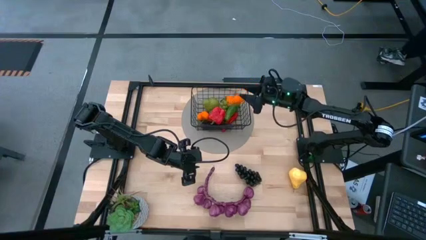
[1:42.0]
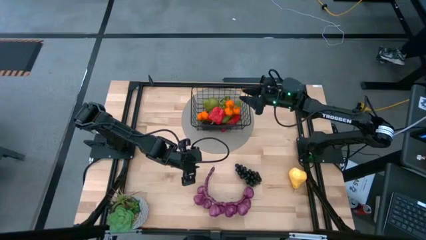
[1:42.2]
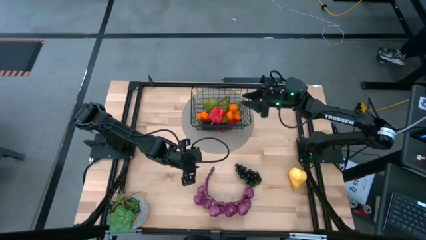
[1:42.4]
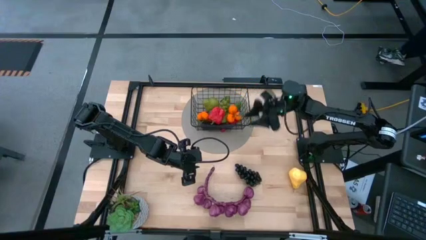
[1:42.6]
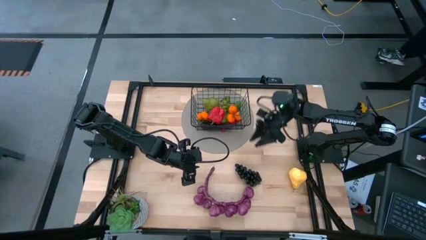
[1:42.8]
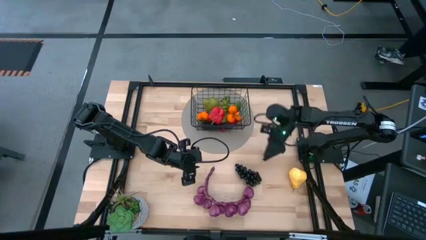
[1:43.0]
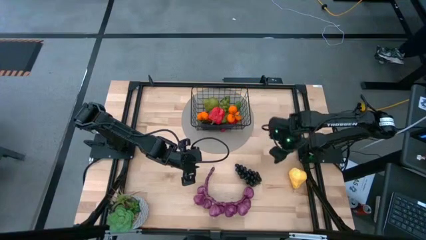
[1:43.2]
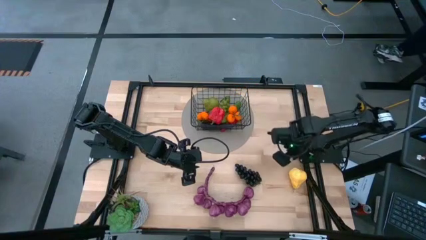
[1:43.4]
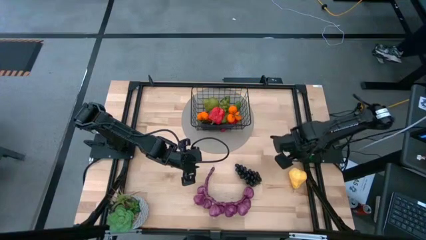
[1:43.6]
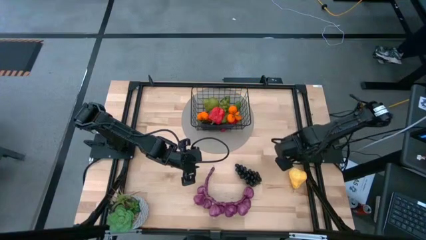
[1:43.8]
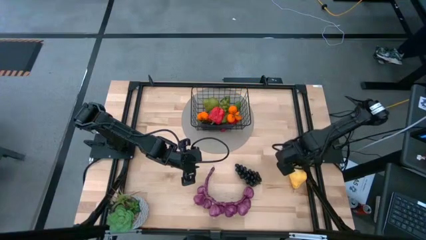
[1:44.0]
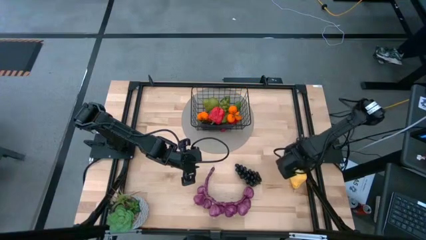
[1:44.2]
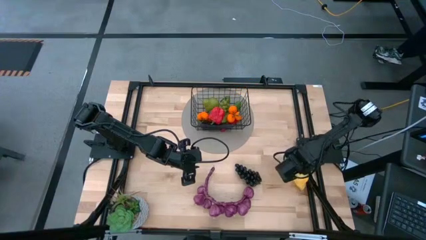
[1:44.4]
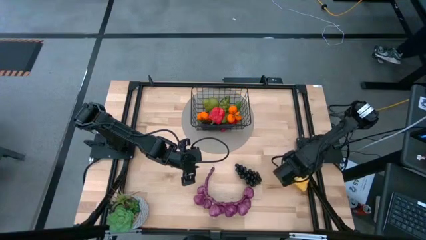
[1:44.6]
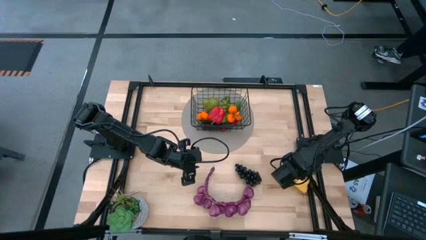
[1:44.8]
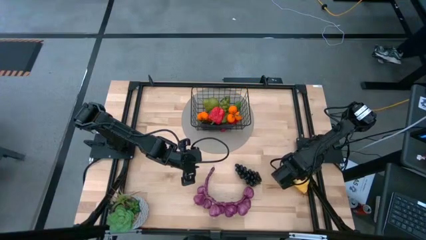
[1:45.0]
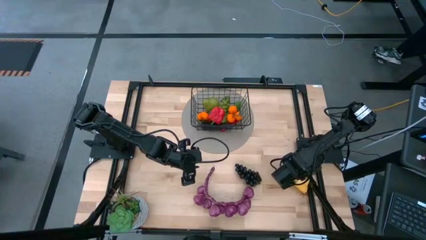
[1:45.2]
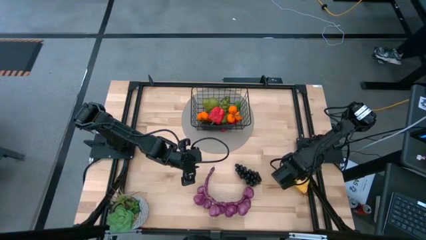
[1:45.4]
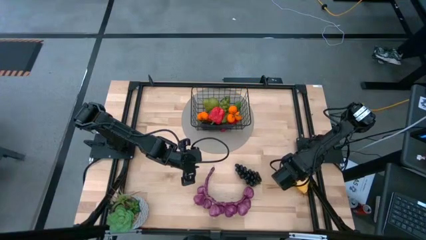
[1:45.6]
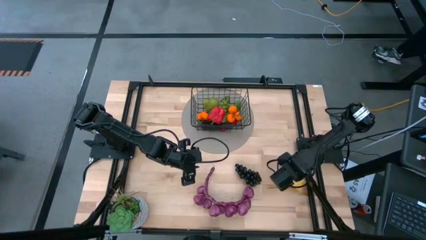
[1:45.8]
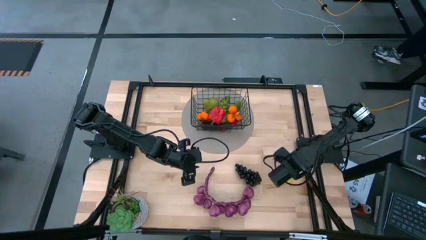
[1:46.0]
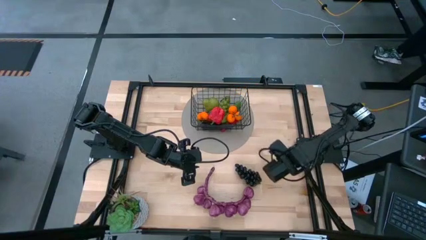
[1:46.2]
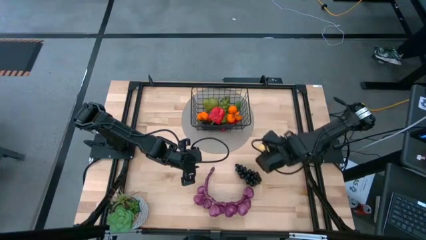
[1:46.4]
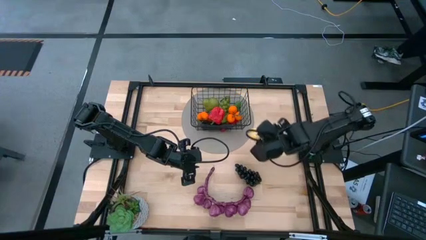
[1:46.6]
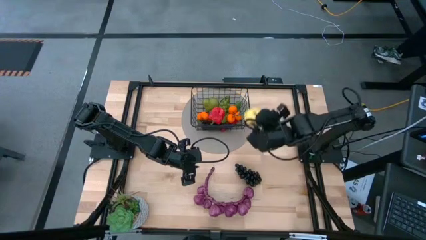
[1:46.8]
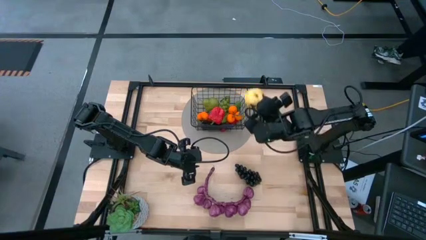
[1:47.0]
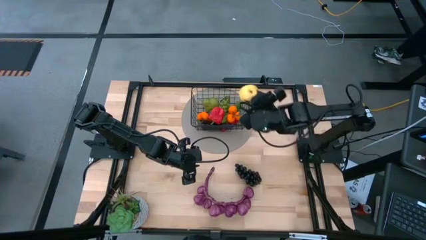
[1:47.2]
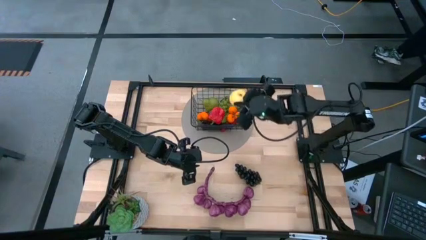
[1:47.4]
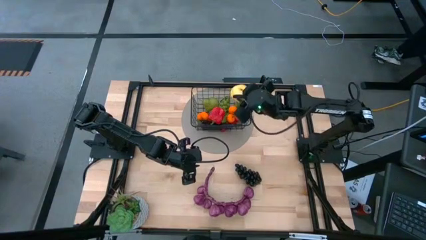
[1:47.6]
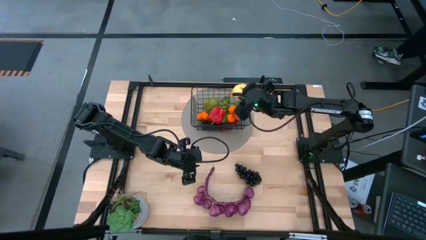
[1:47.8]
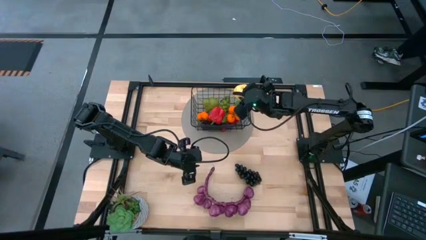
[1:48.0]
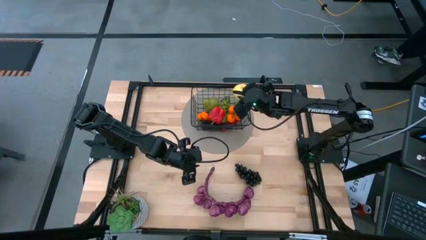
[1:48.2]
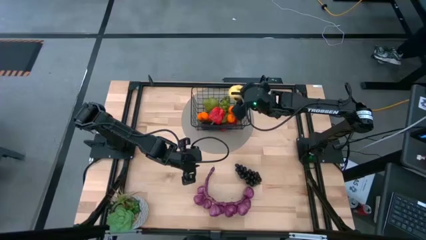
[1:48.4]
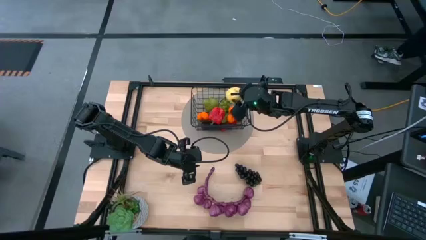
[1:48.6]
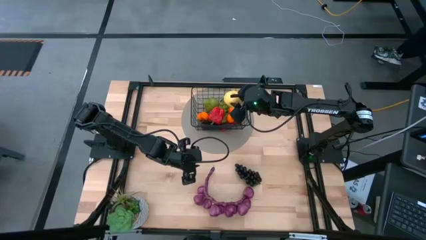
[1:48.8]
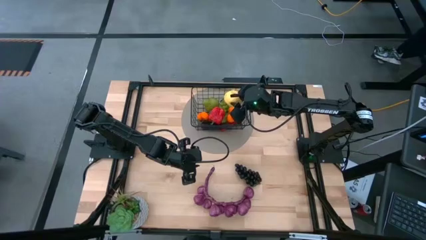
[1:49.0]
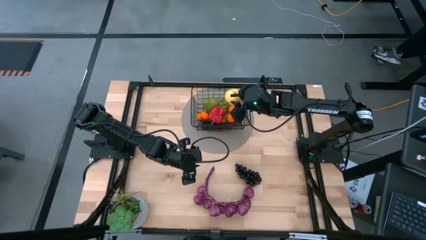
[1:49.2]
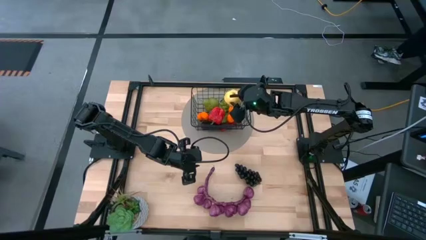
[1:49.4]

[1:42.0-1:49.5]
Task: Build produce basket
Put the yellow pear into the black wire basket

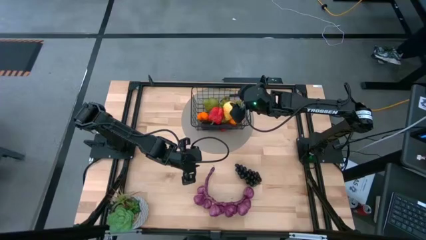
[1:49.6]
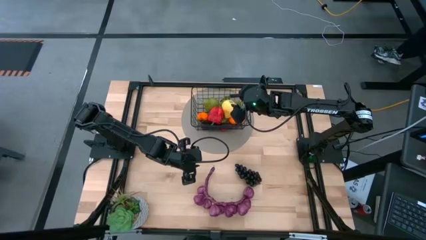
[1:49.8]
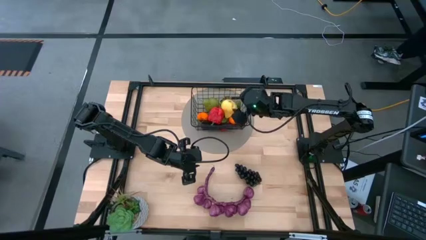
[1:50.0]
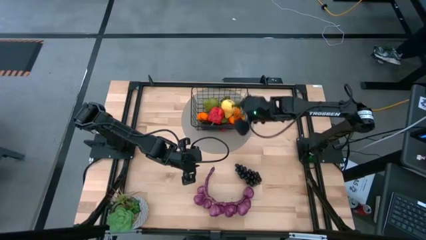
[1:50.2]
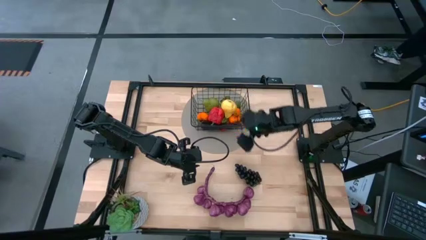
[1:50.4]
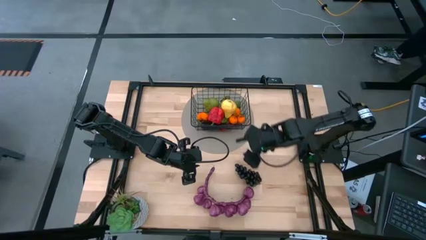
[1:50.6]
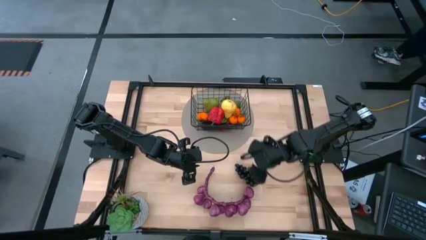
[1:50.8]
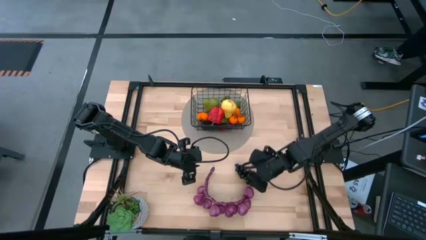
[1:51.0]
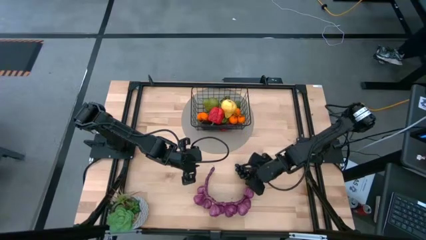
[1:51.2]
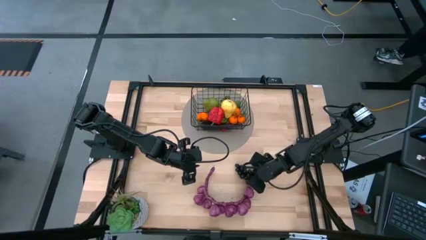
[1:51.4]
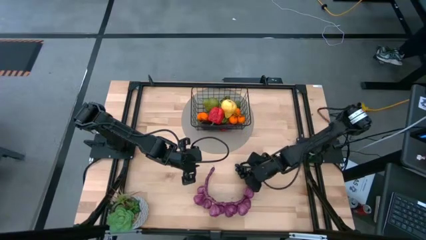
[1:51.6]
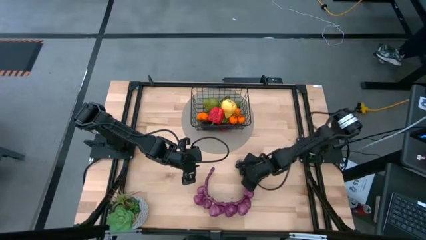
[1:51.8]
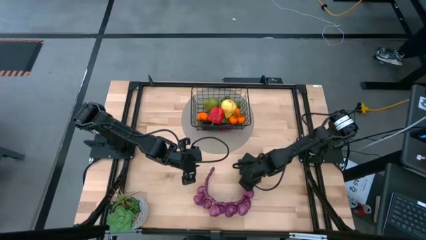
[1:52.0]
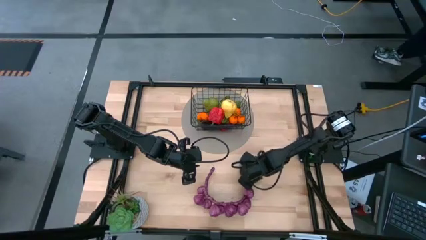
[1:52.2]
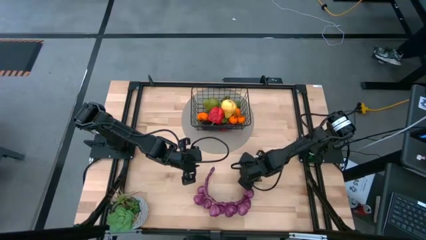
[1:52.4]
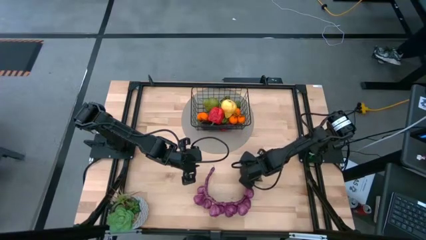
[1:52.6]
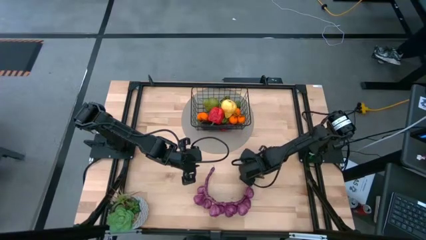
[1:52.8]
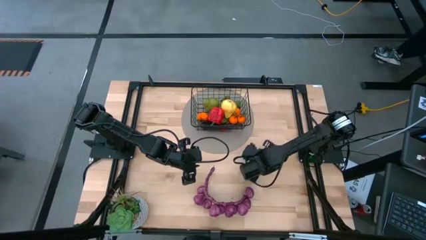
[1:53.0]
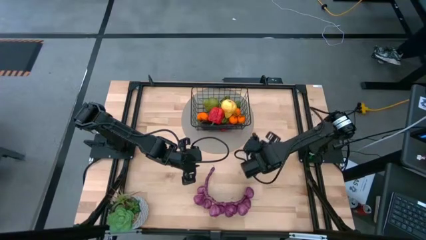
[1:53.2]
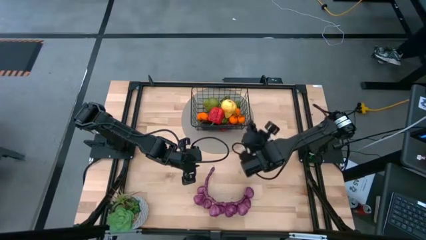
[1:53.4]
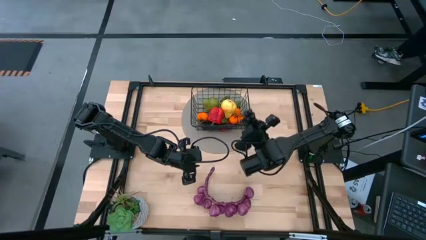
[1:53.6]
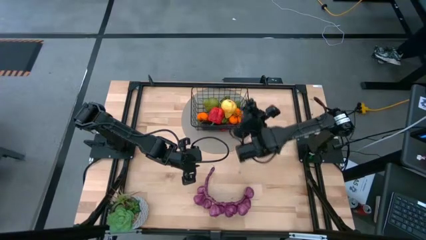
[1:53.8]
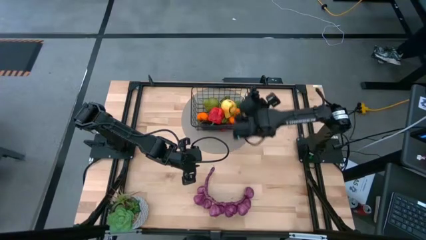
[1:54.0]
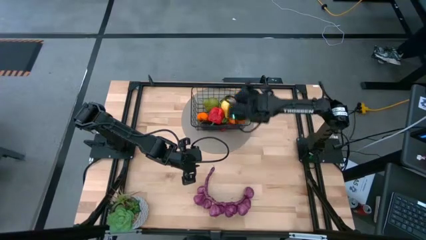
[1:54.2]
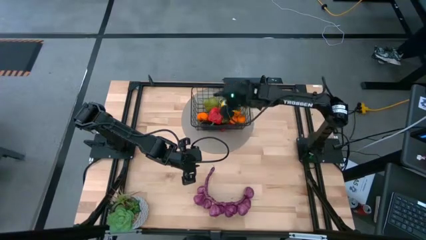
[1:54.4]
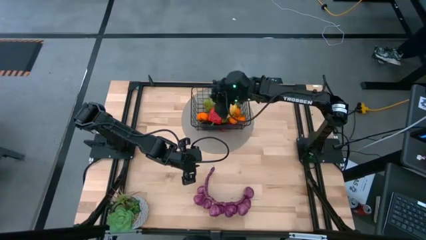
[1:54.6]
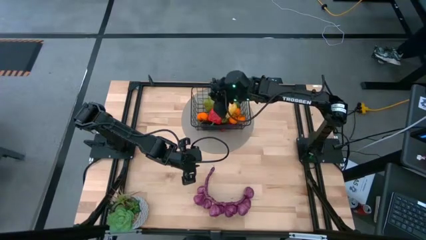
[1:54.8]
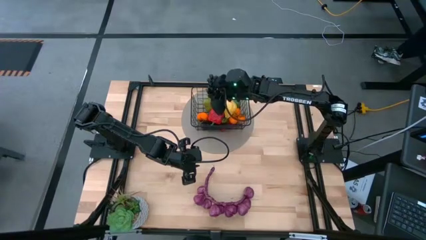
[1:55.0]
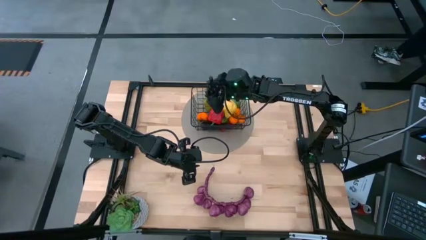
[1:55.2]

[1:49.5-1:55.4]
Put the black grapes into the black wire basket

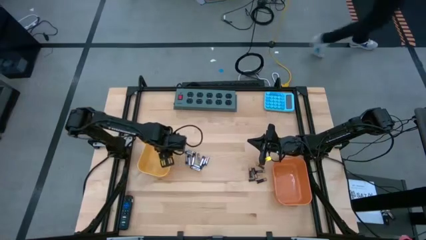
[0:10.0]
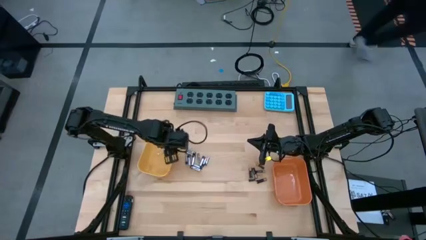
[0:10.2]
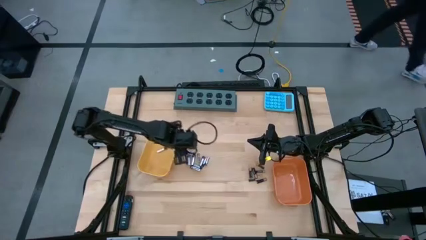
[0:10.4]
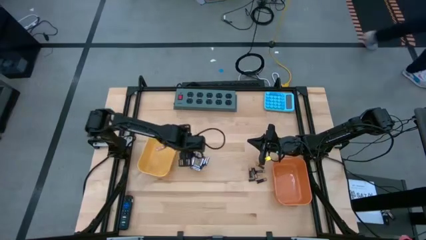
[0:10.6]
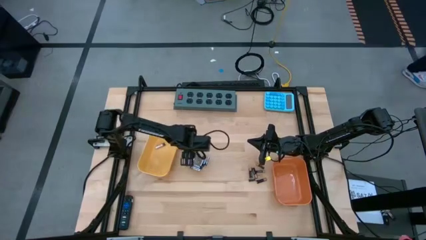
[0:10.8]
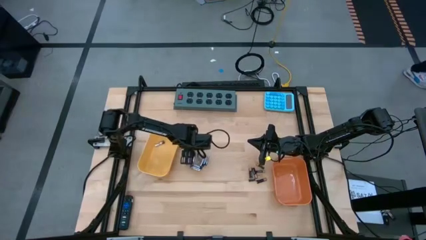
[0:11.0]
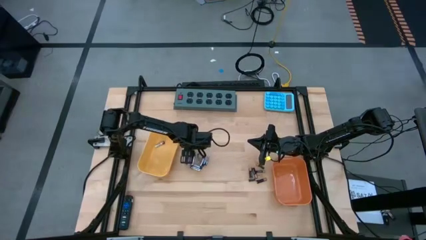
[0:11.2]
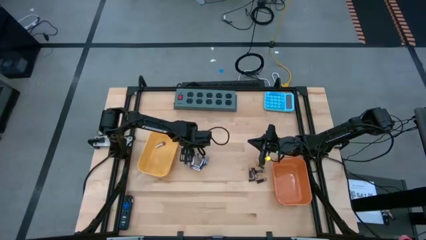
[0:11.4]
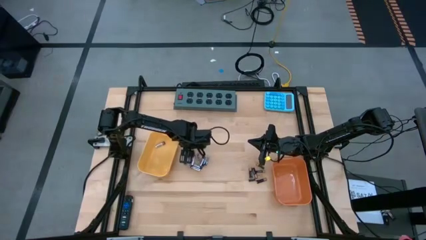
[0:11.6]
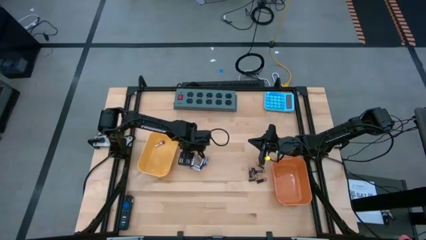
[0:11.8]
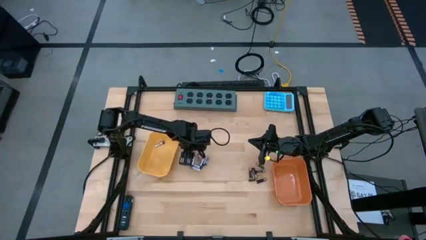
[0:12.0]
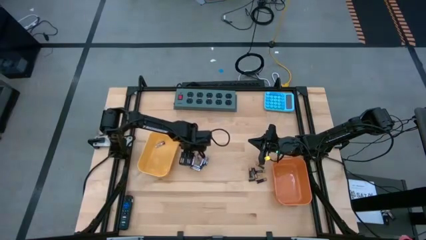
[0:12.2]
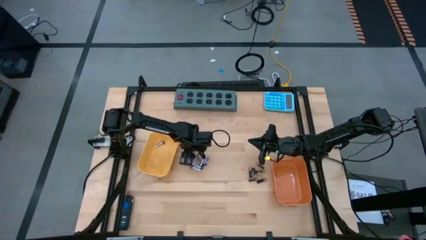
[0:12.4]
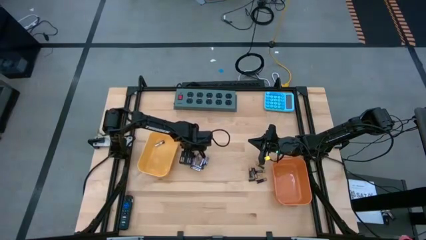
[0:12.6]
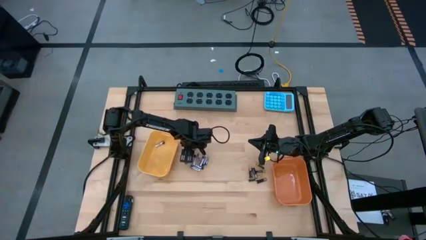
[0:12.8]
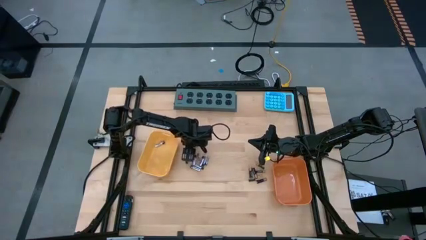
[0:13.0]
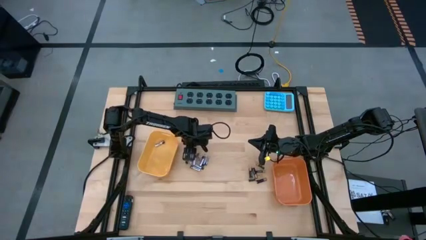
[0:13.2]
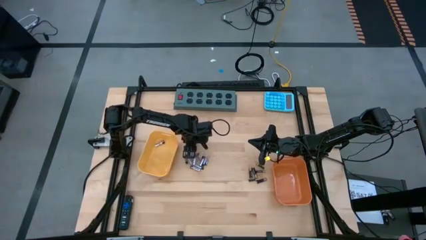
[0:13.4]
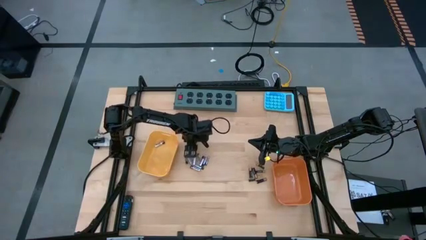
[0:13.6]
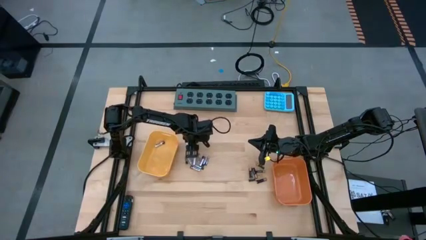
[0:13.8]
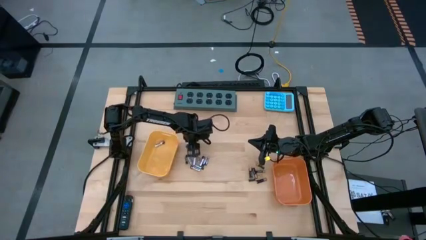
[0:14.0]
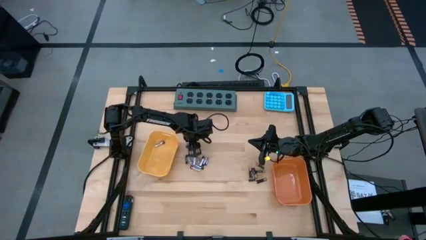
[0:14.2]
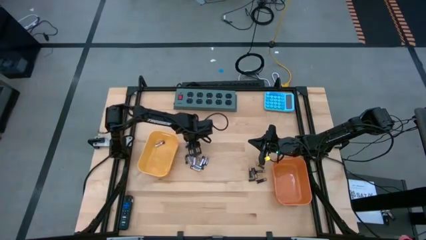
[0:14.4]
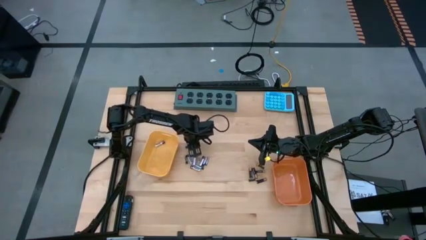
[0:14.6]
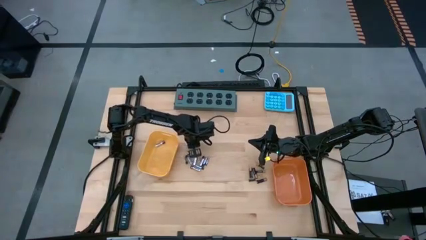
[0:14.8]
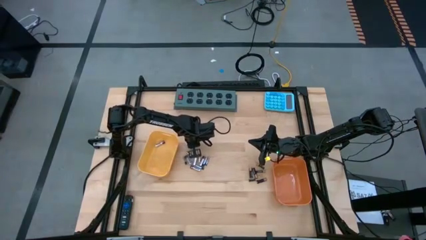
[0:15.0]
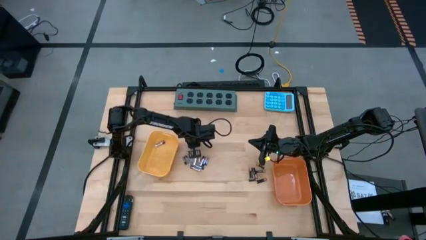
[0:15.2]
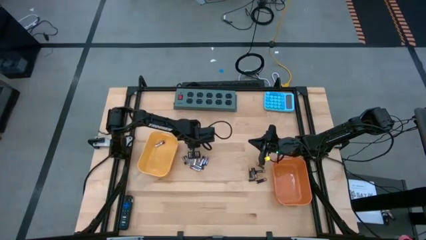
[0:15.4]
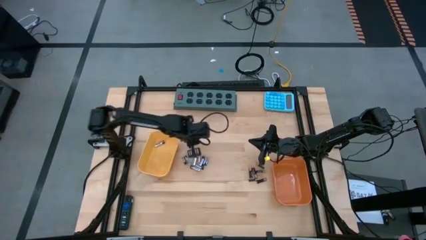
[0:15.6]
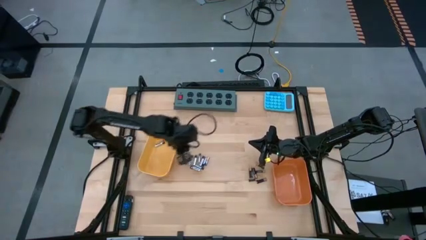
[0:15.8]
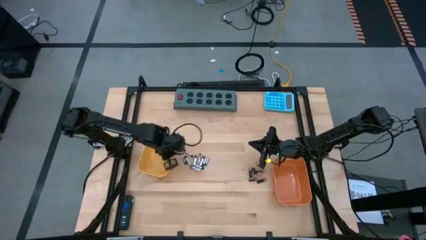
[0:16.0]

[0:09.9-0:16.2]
Task: Sort batteries
Put the silver battery into the yellow bin
